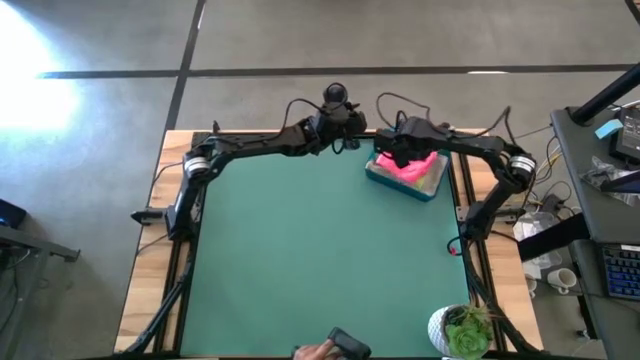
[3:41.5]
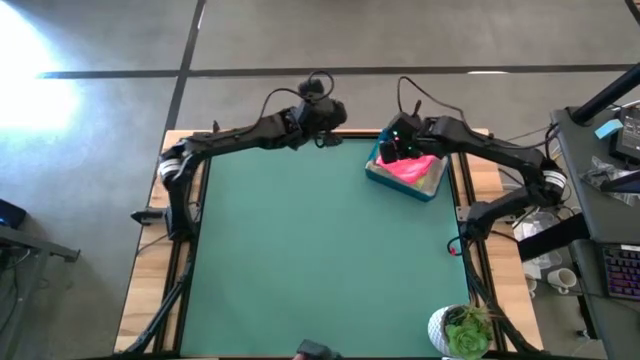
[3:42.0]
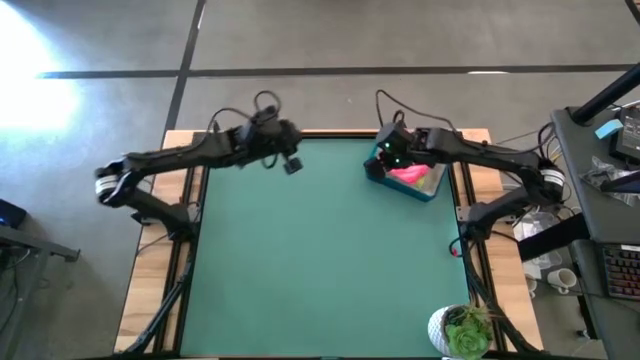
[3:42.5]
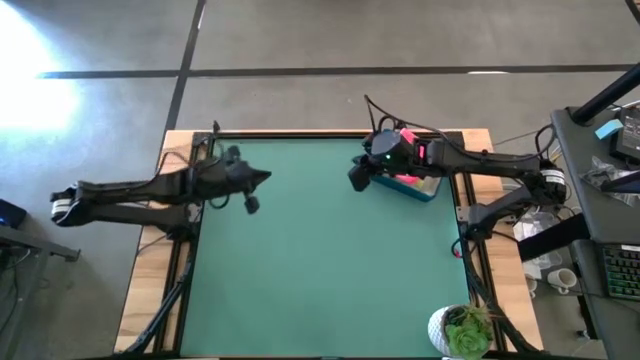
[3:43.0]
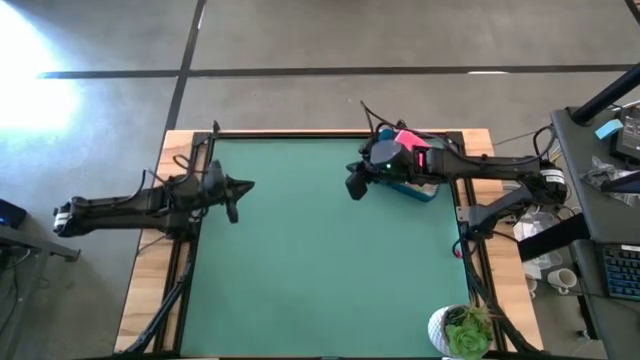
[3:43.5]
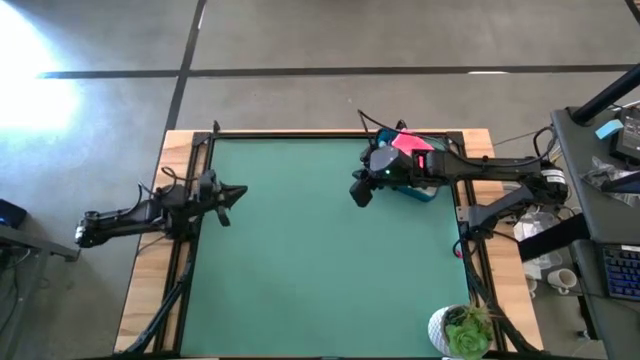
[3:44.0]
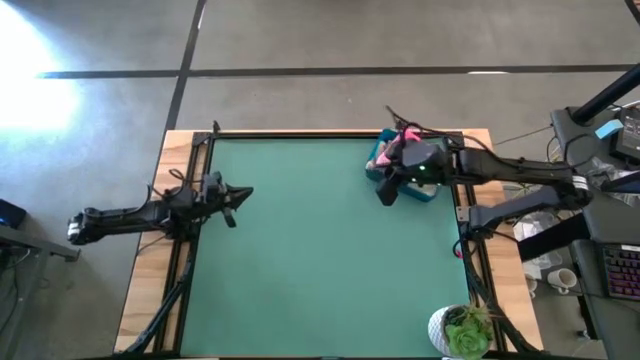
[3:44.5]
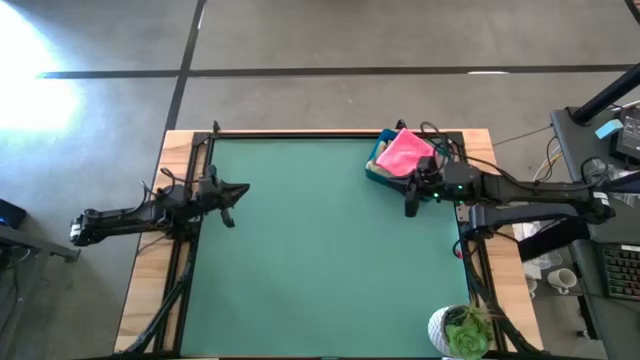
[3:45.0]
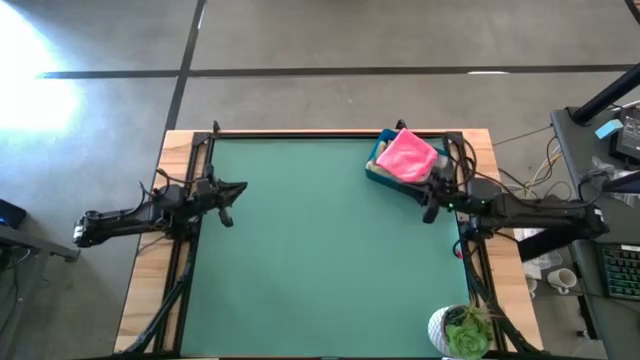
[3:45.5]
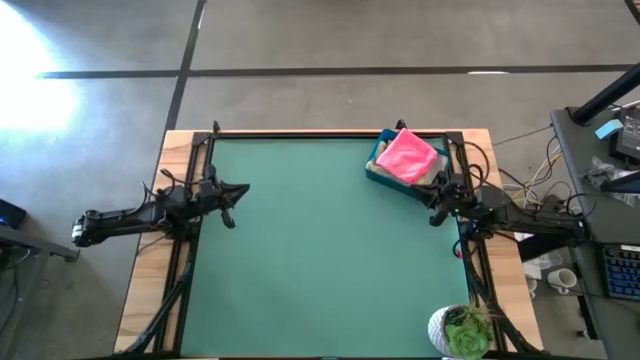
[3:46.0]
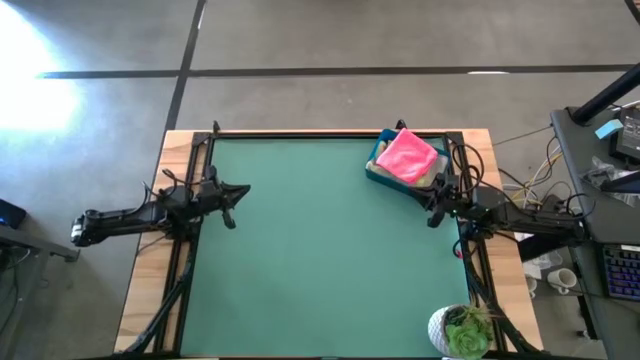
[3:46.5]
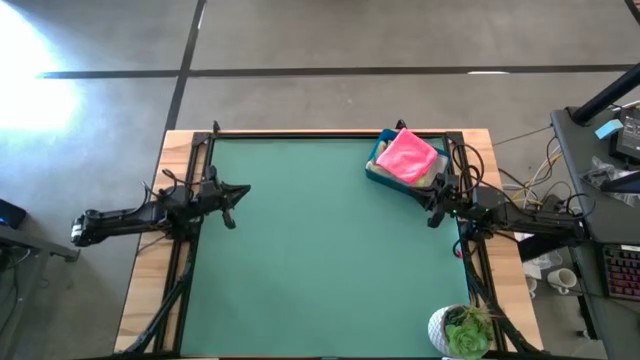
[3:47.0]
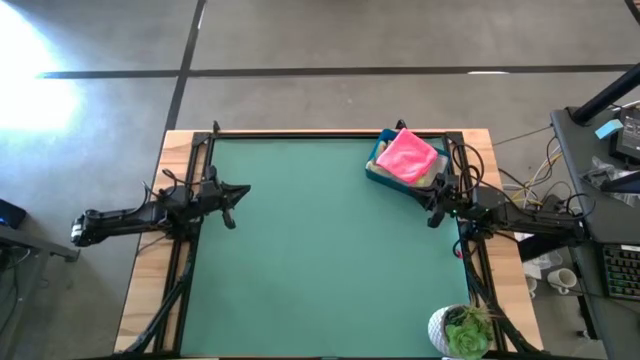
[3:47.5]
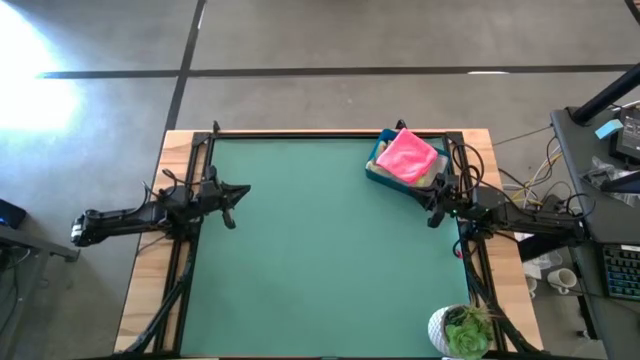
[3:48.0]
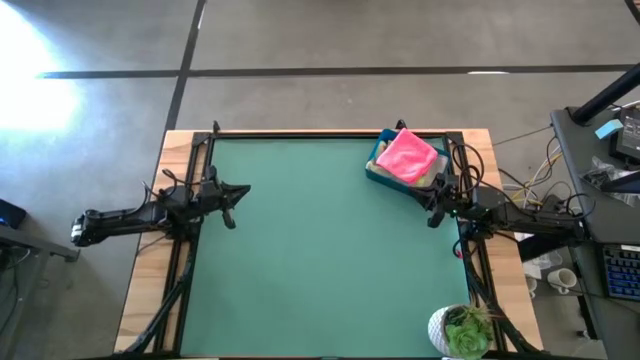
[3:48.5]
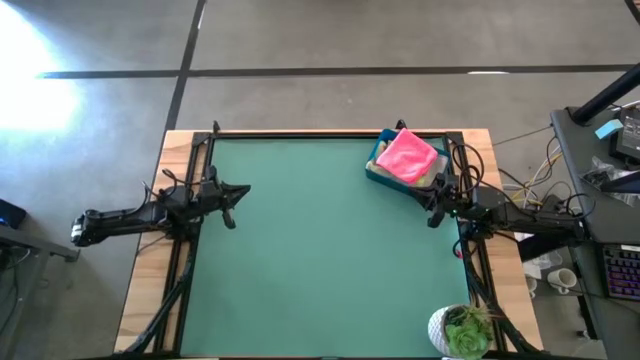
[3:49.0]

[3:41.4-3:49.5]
Task: Fold microfiber towels
Return to Home Position

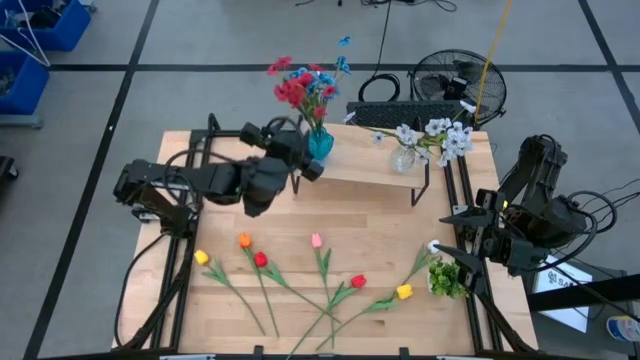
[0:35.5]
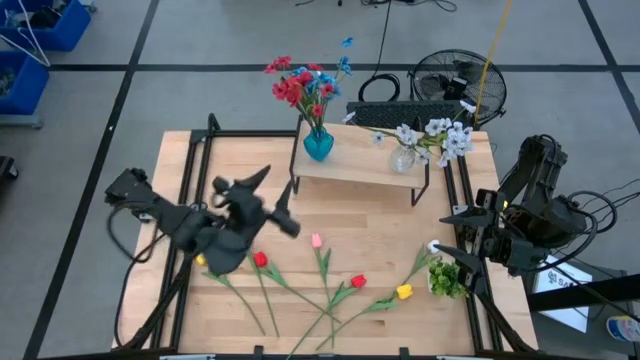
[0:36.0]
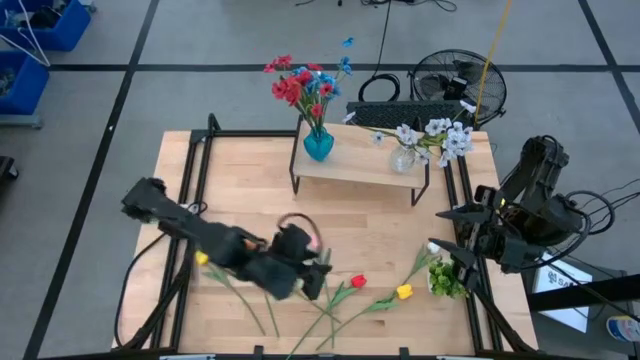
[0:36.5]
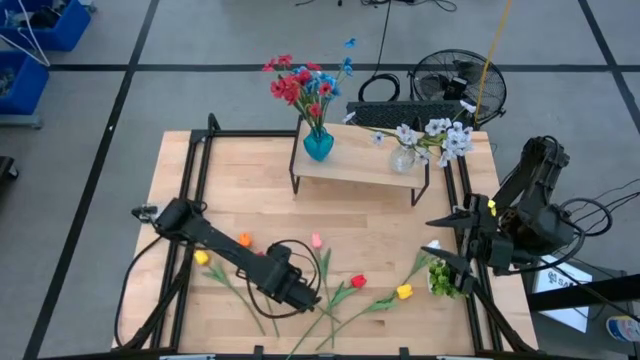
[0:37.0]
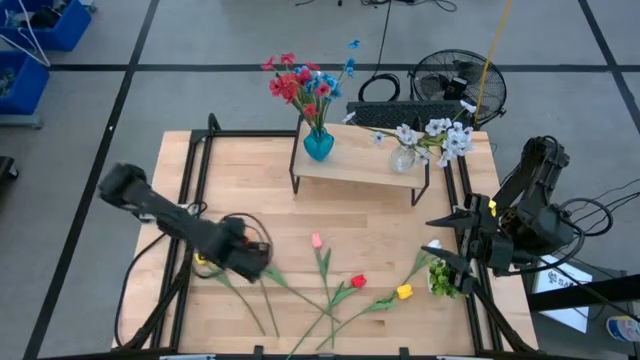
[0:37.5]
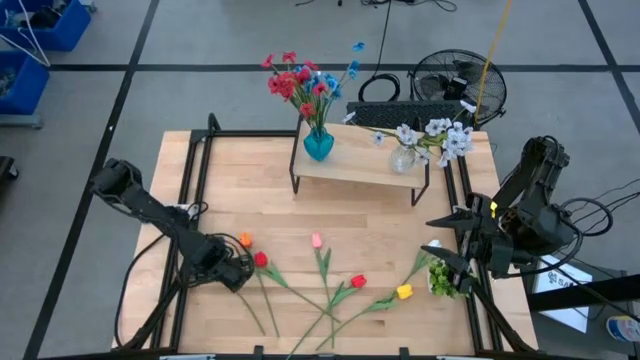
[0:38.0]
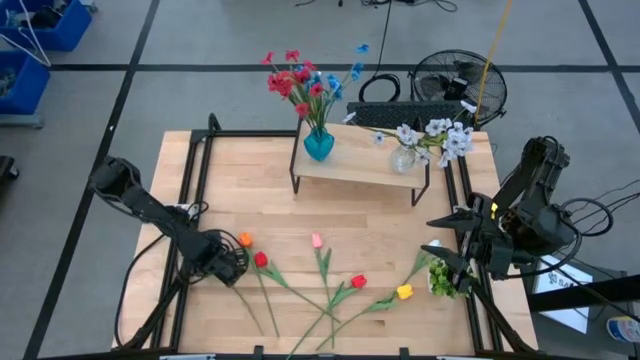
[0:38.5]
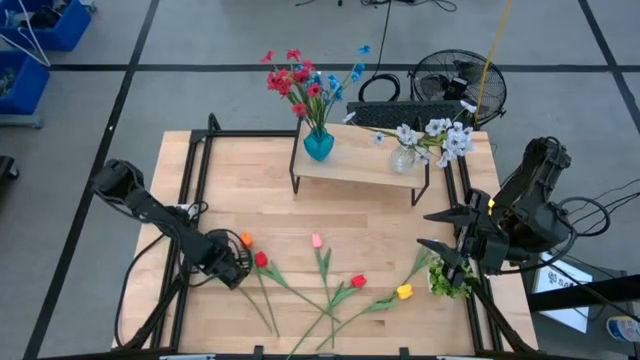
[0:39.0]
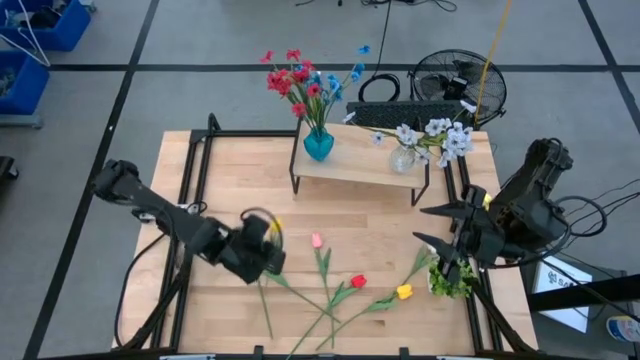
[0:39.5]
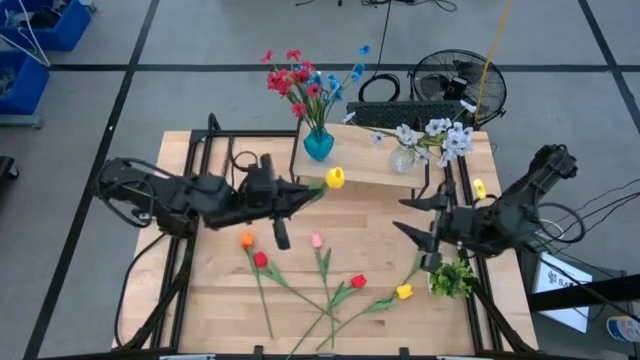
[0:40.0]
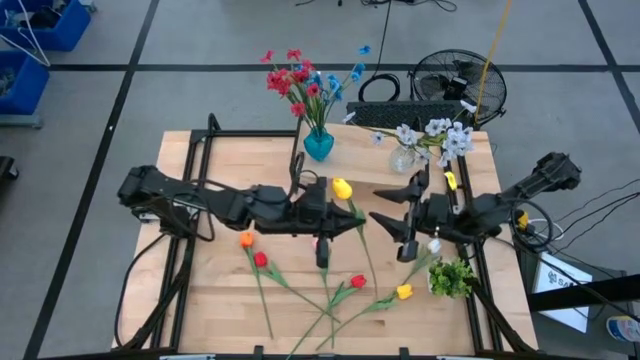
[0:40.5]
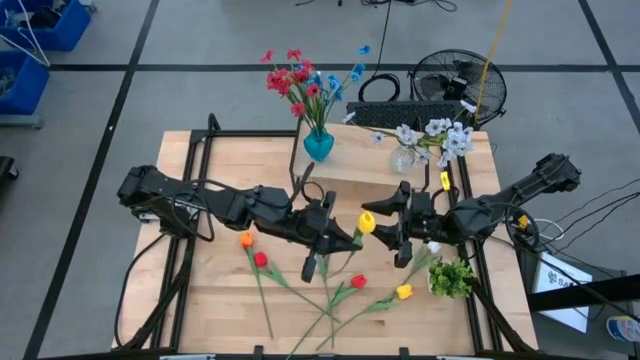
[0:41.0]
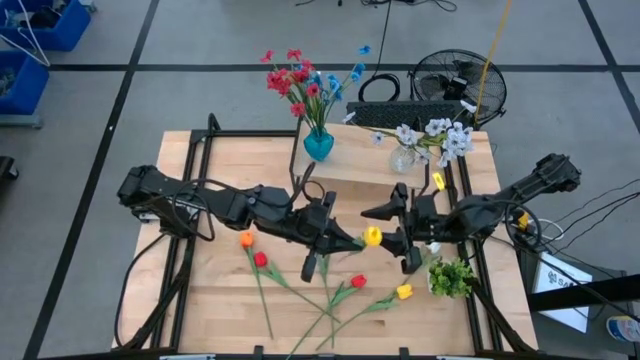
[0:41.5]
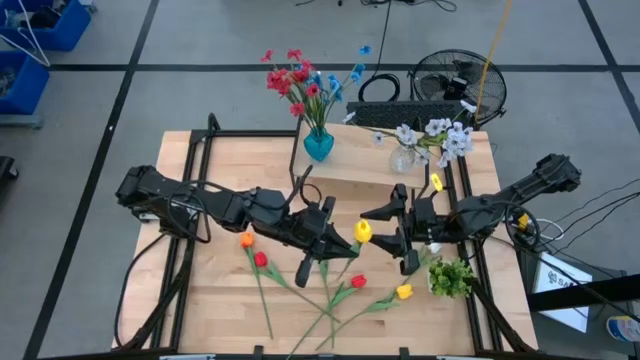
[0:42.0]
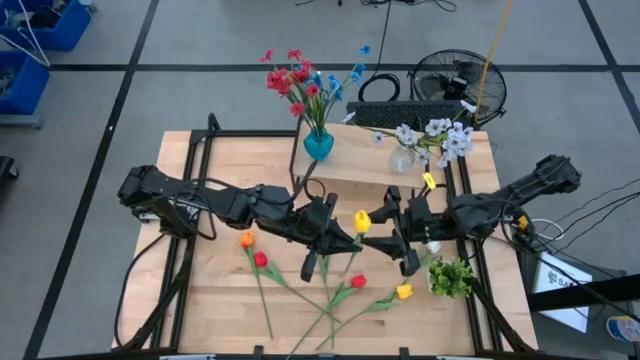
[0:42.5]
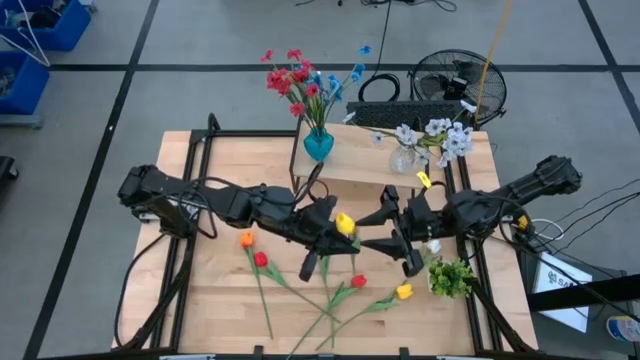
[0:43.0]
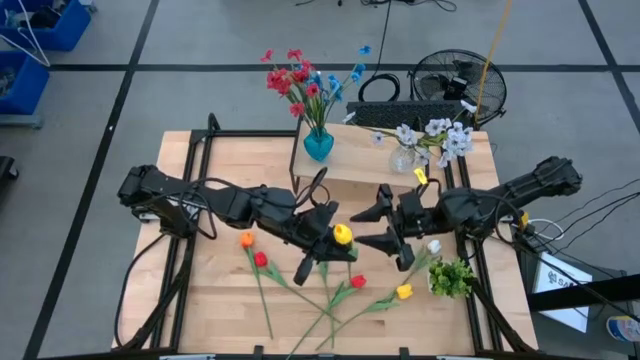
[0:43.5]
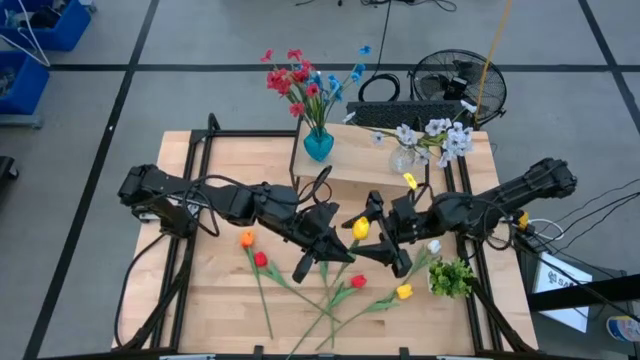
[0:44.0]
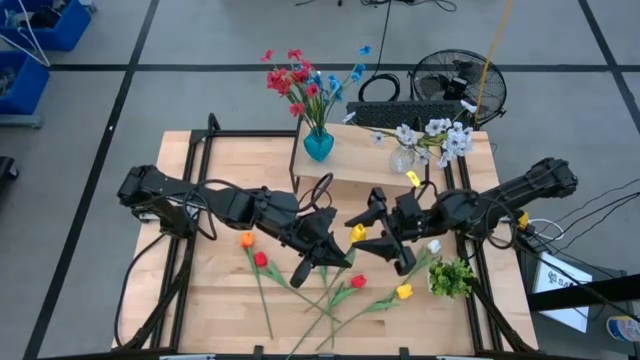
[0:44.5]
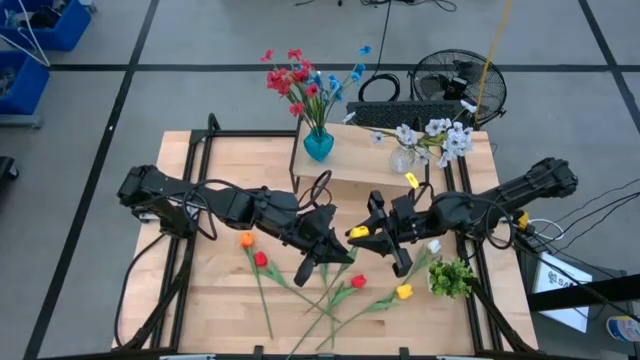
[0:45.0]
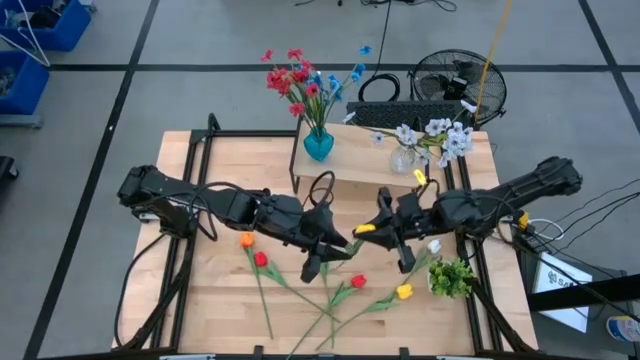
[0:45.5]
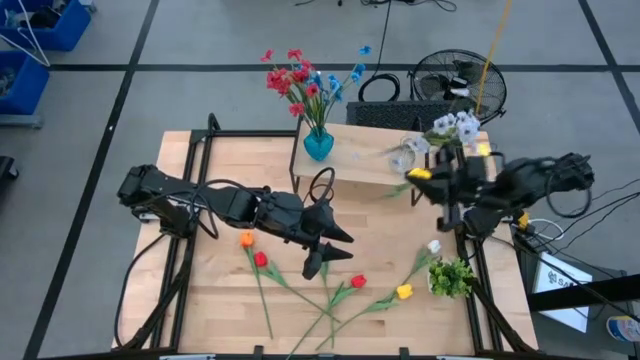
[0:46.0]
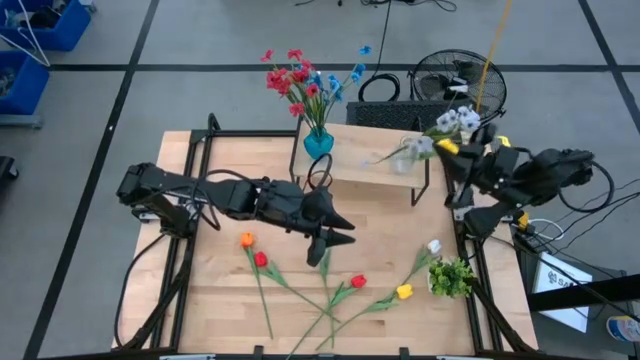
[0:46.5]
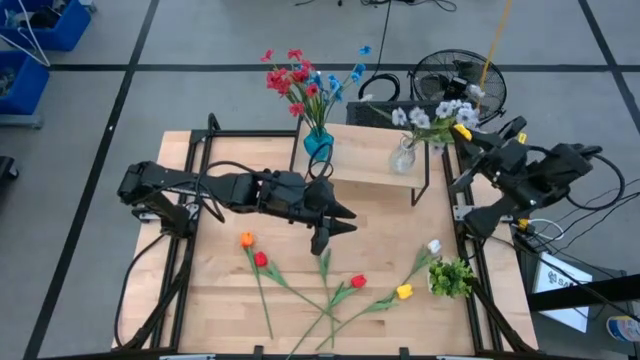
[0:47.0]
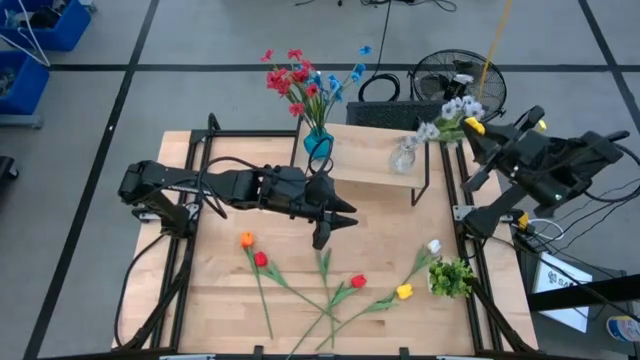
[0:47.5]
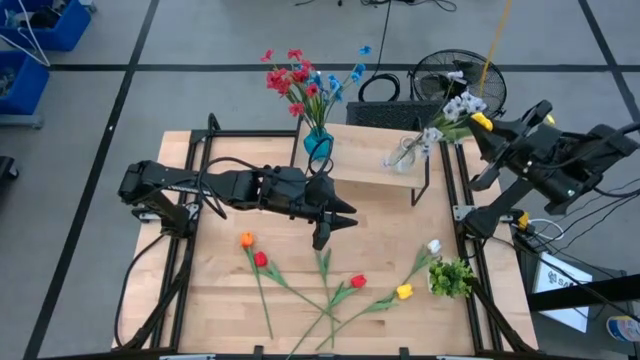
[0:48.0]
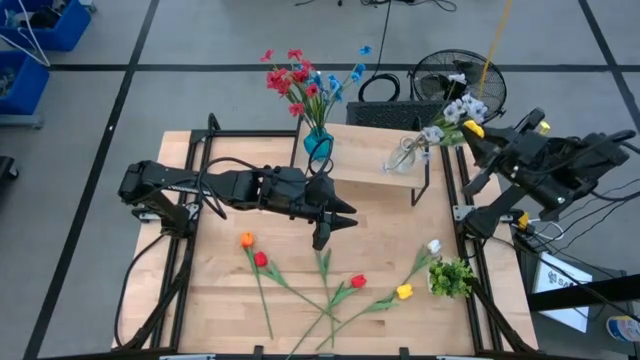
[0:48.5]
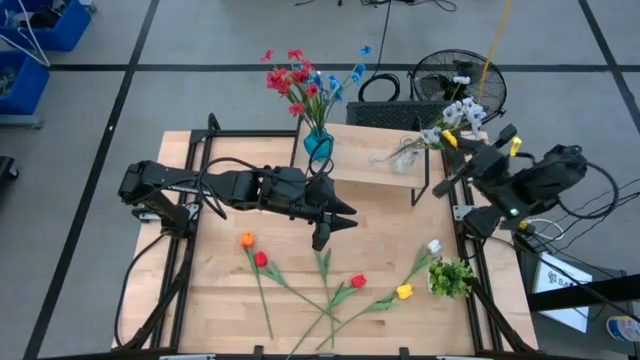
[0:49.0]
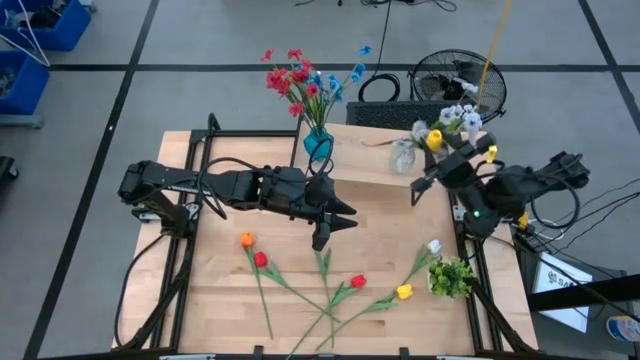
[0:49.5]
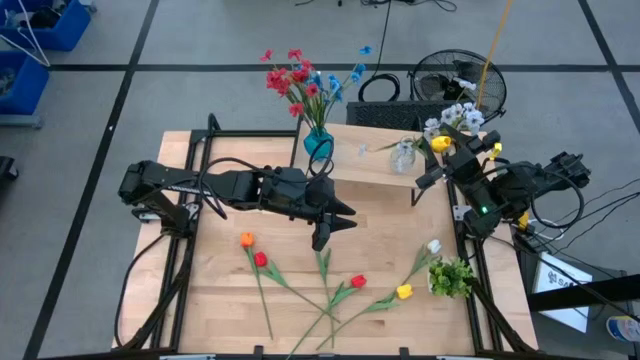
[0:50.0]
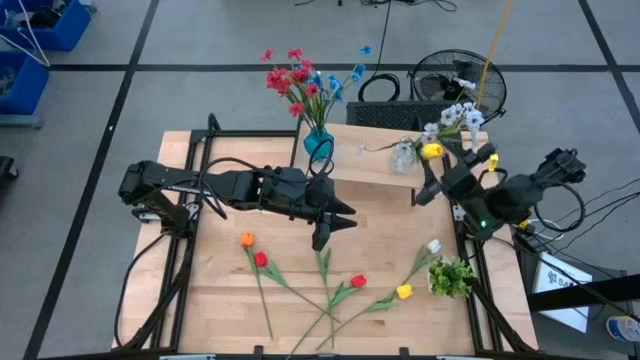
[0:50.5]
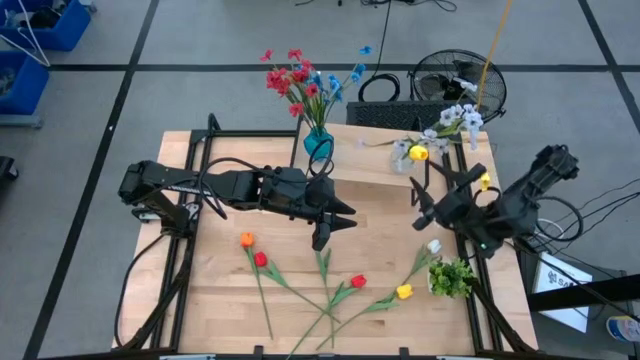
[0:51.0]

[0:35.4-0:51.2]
Task: Pick and place flowers into a vace then onto a shelf
Put the left yellow tulip into the transparent vase
